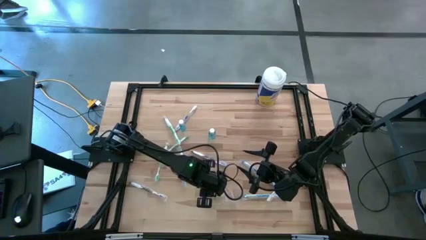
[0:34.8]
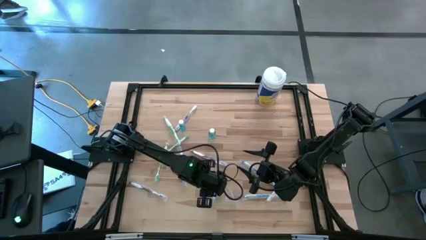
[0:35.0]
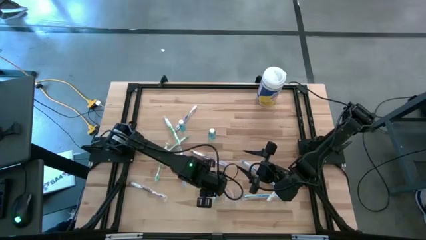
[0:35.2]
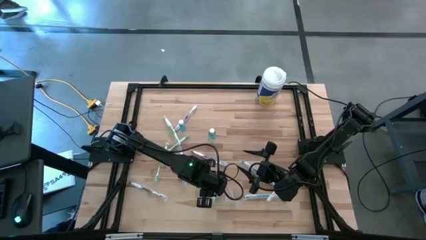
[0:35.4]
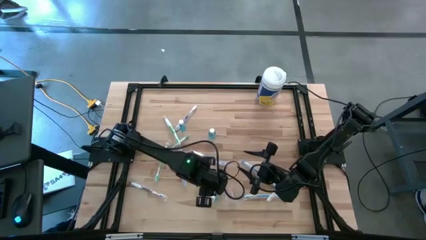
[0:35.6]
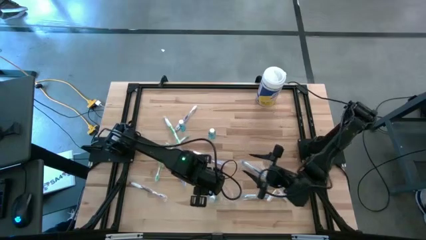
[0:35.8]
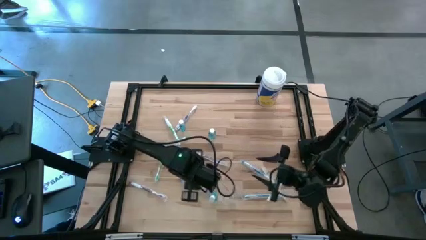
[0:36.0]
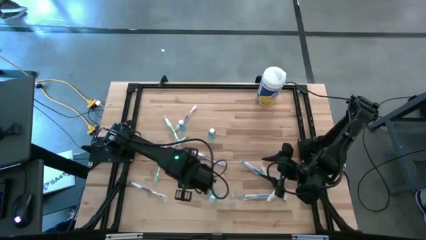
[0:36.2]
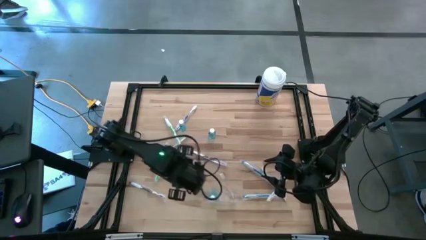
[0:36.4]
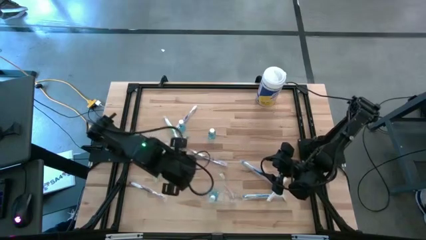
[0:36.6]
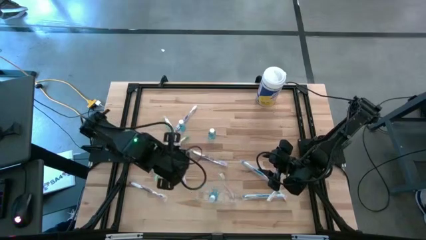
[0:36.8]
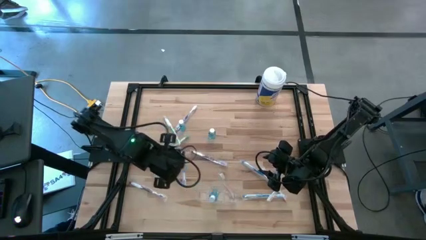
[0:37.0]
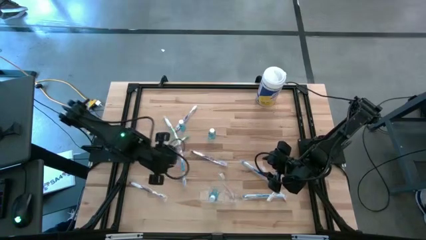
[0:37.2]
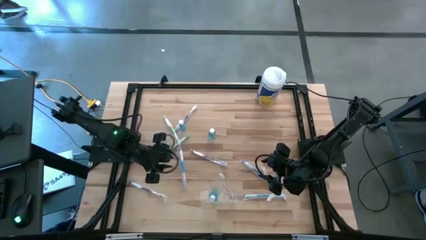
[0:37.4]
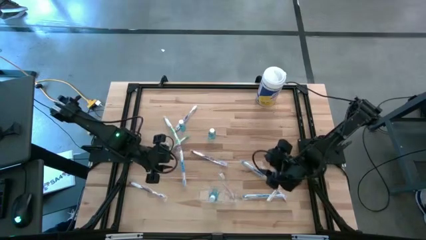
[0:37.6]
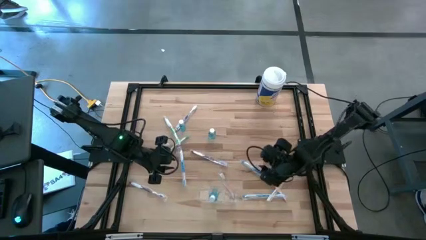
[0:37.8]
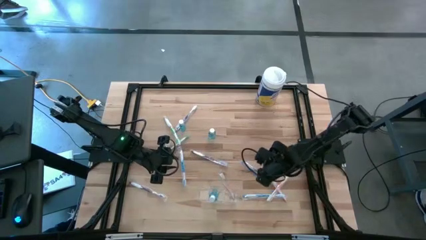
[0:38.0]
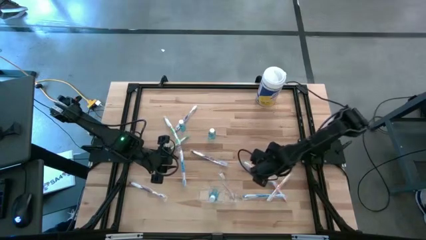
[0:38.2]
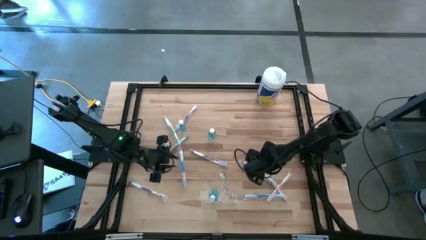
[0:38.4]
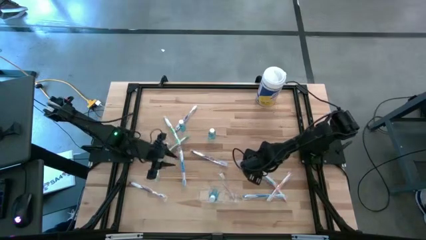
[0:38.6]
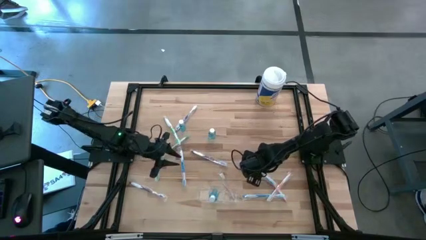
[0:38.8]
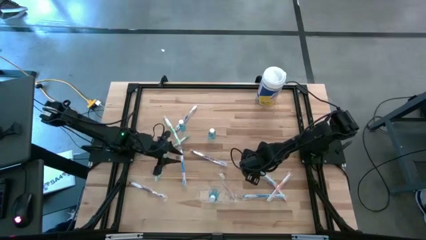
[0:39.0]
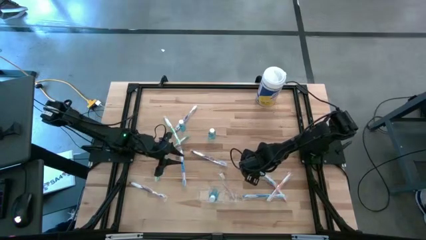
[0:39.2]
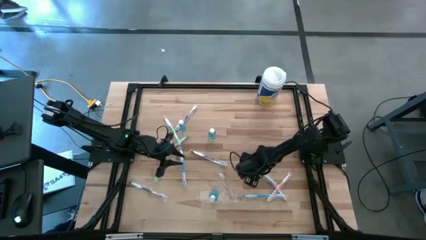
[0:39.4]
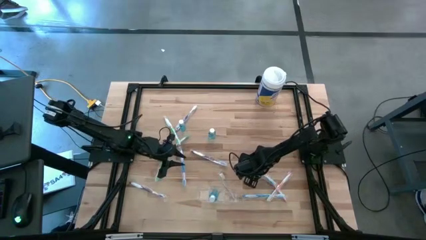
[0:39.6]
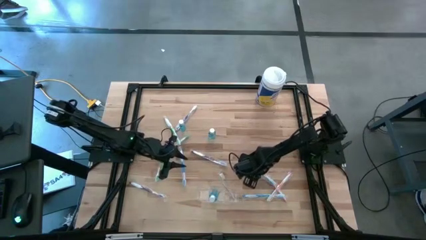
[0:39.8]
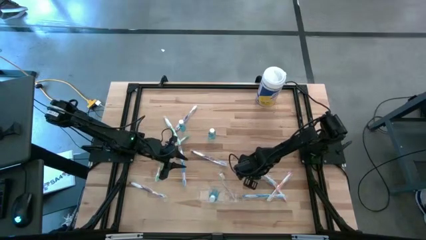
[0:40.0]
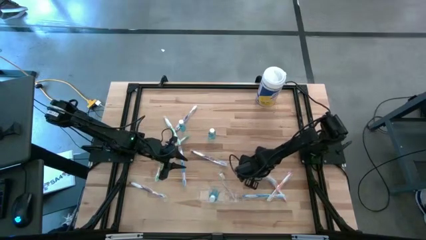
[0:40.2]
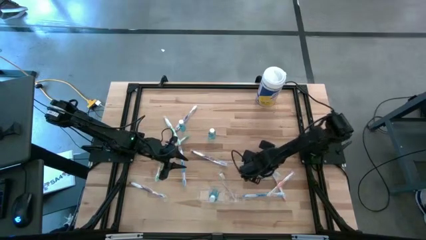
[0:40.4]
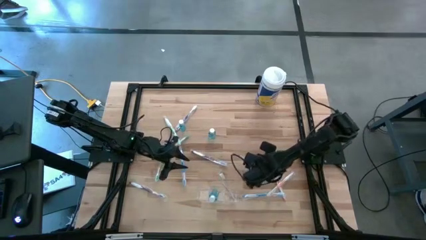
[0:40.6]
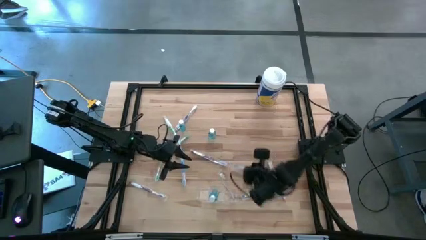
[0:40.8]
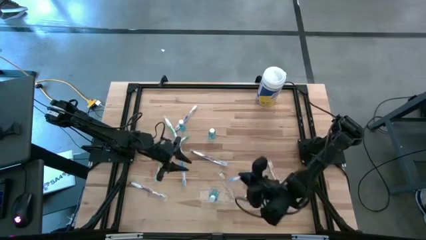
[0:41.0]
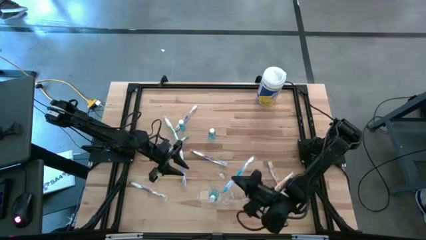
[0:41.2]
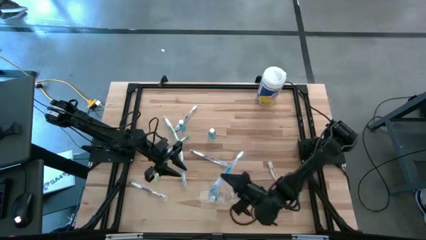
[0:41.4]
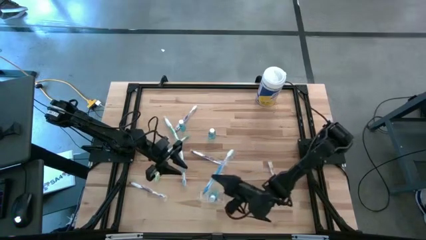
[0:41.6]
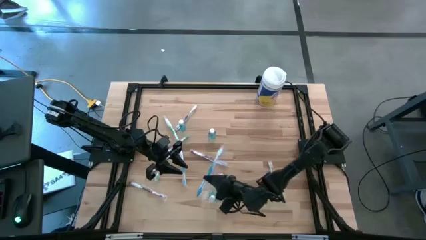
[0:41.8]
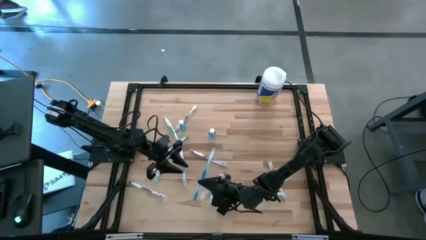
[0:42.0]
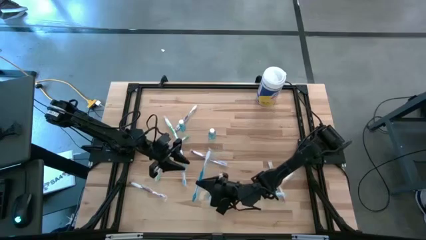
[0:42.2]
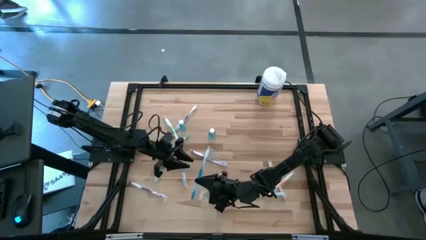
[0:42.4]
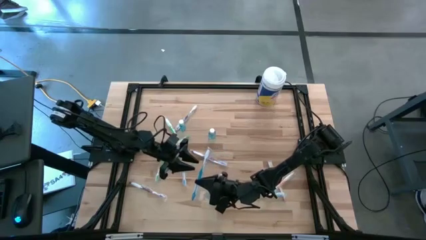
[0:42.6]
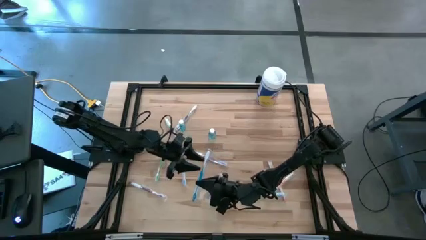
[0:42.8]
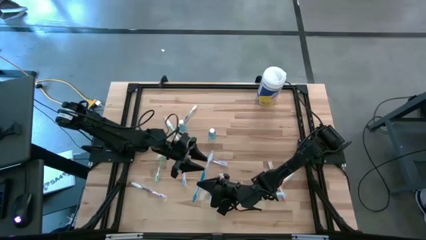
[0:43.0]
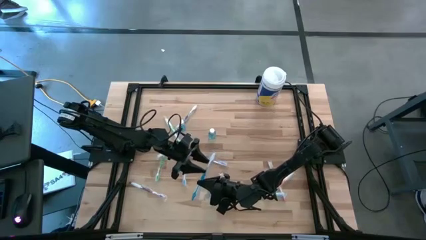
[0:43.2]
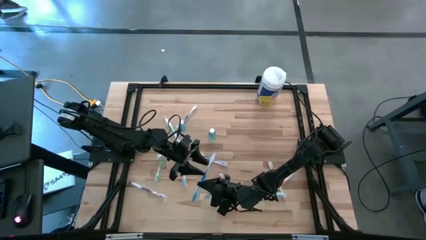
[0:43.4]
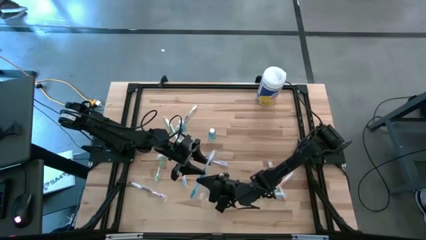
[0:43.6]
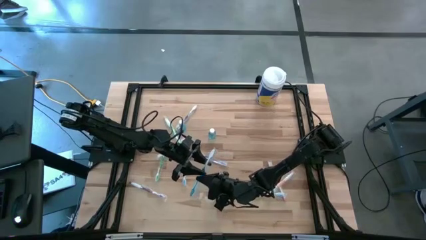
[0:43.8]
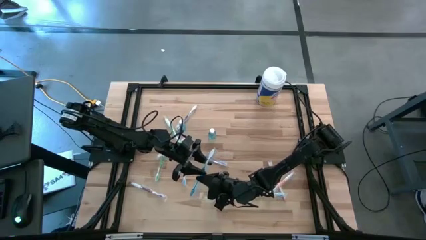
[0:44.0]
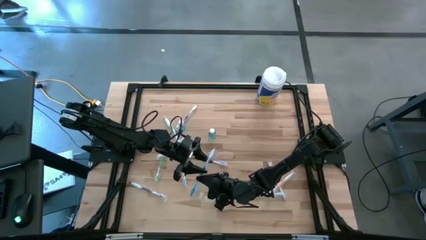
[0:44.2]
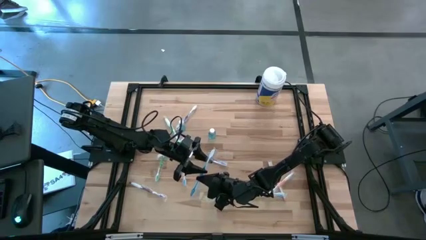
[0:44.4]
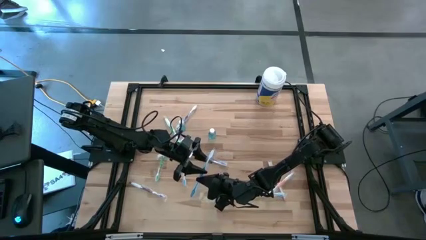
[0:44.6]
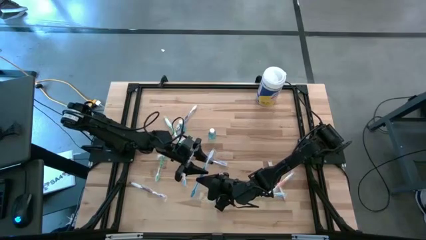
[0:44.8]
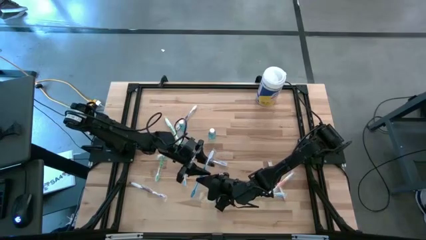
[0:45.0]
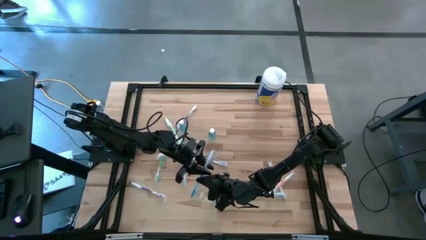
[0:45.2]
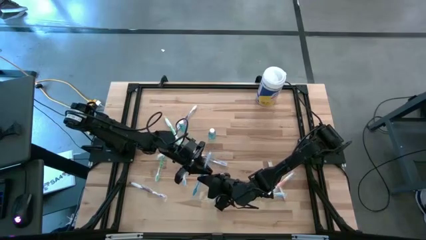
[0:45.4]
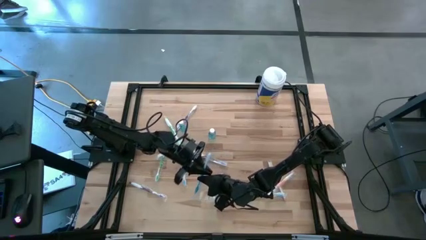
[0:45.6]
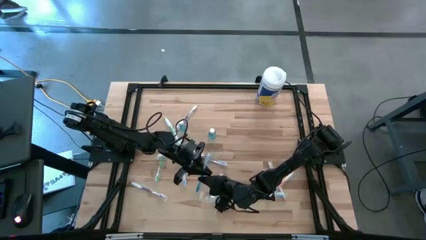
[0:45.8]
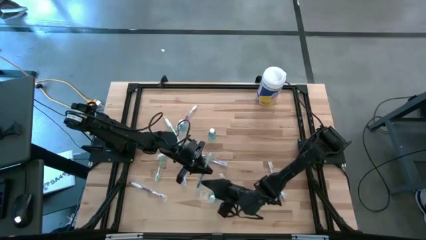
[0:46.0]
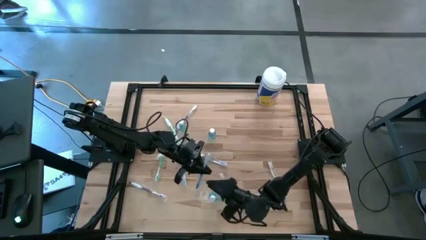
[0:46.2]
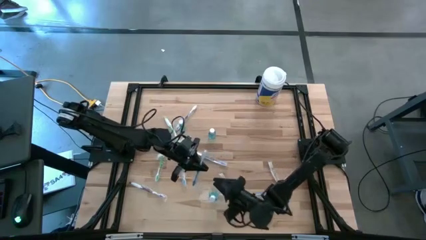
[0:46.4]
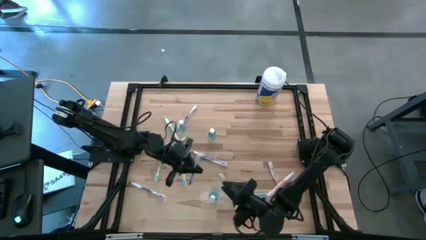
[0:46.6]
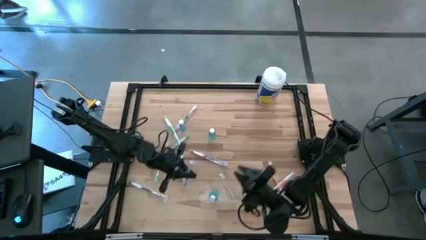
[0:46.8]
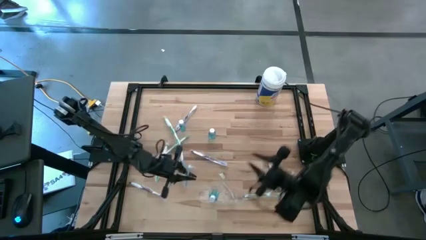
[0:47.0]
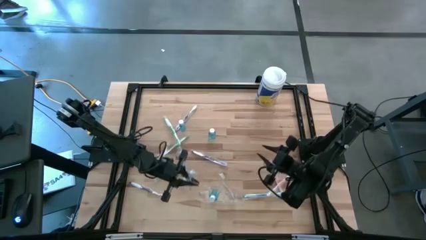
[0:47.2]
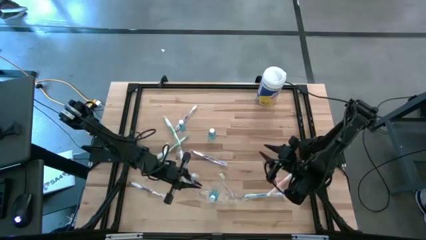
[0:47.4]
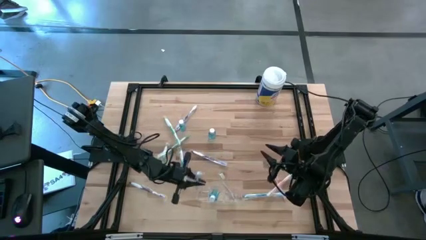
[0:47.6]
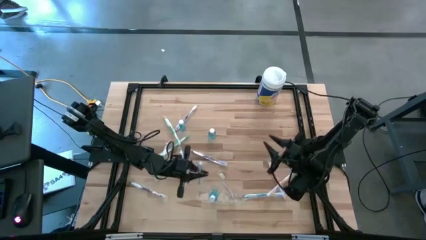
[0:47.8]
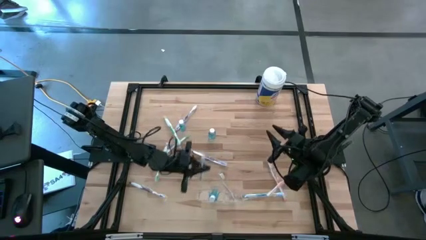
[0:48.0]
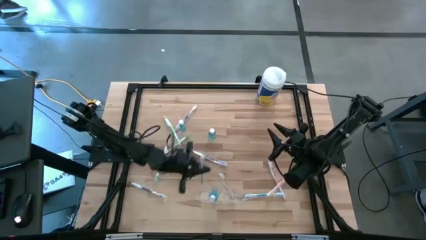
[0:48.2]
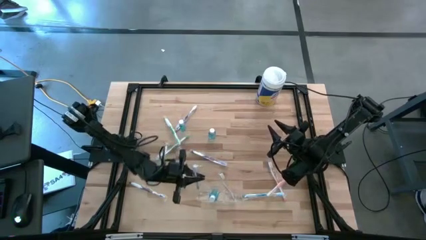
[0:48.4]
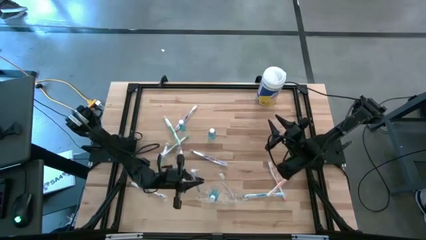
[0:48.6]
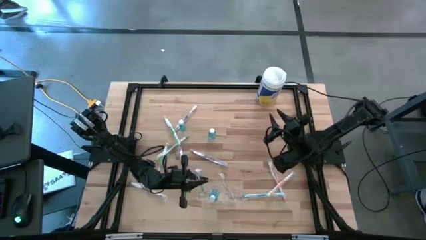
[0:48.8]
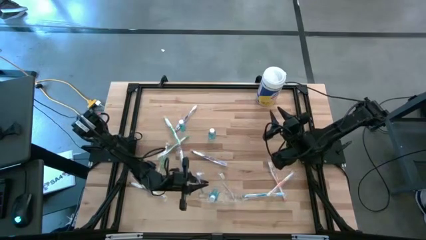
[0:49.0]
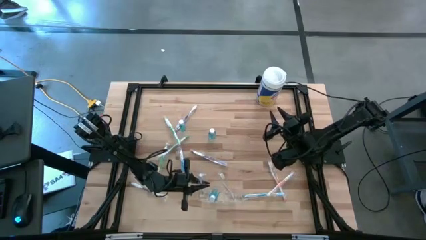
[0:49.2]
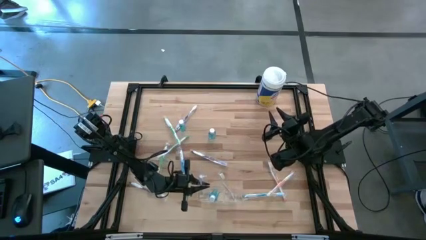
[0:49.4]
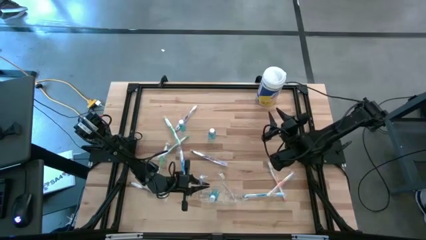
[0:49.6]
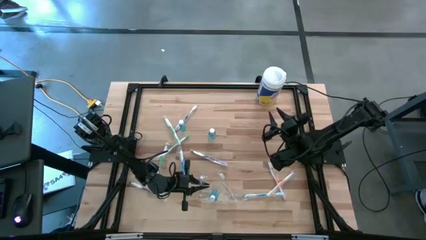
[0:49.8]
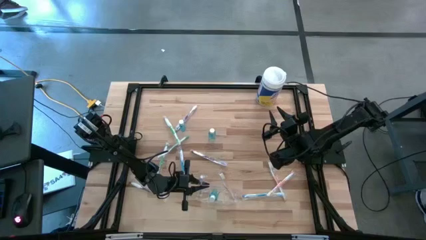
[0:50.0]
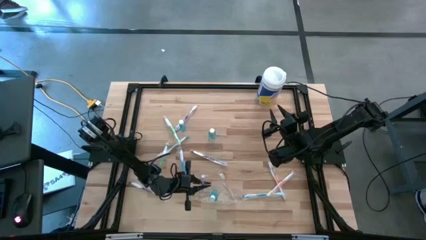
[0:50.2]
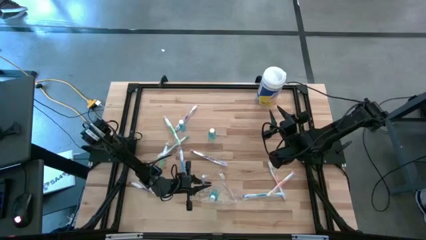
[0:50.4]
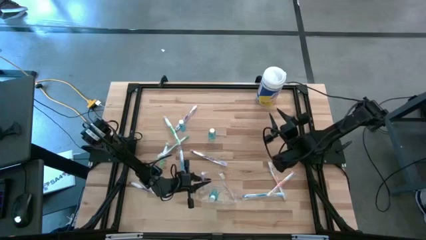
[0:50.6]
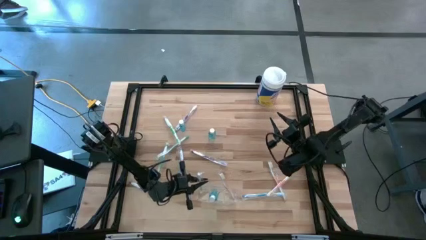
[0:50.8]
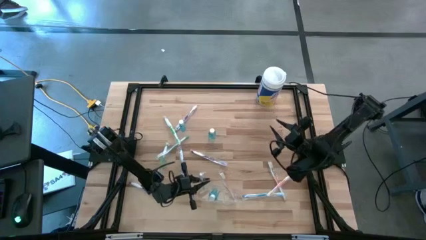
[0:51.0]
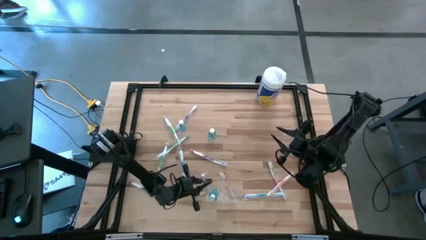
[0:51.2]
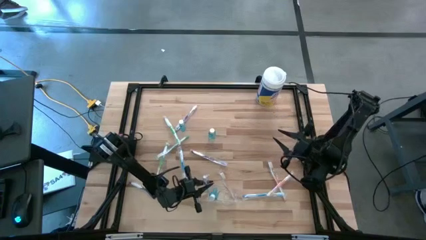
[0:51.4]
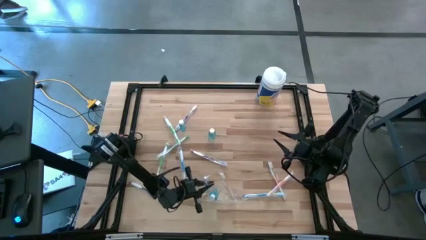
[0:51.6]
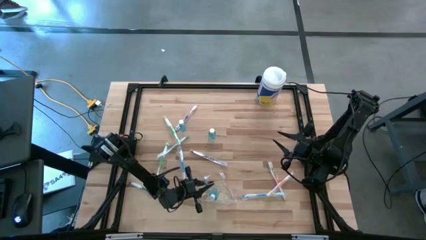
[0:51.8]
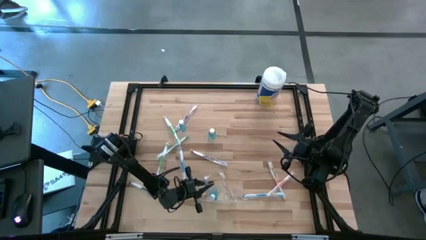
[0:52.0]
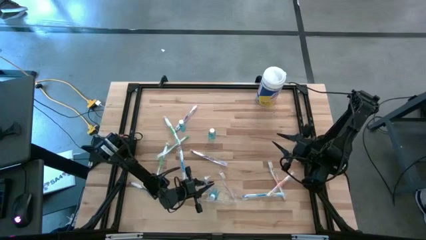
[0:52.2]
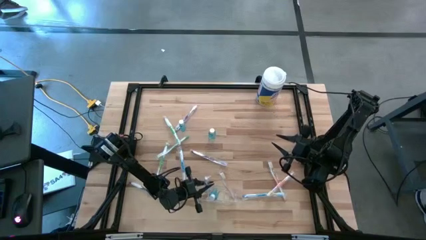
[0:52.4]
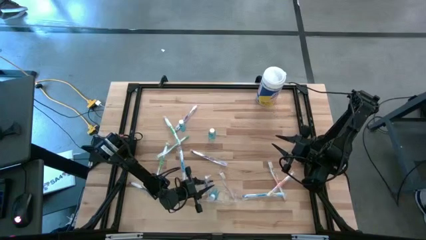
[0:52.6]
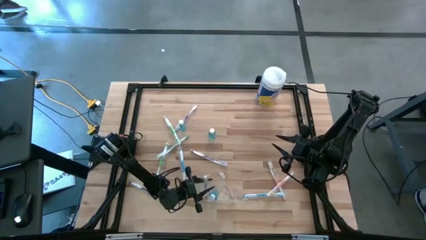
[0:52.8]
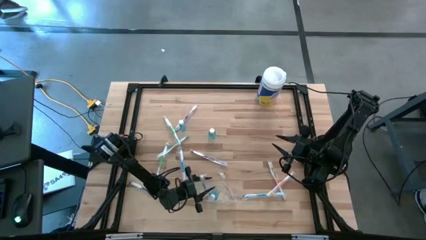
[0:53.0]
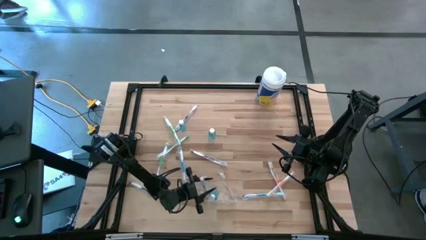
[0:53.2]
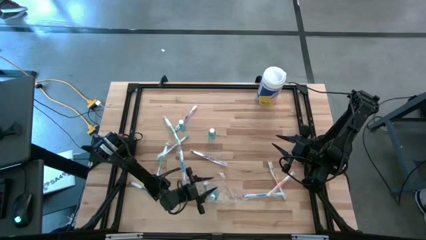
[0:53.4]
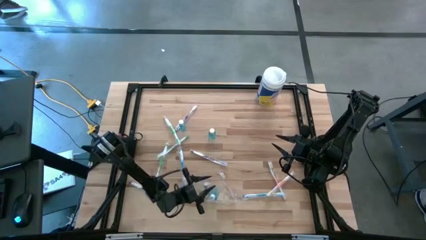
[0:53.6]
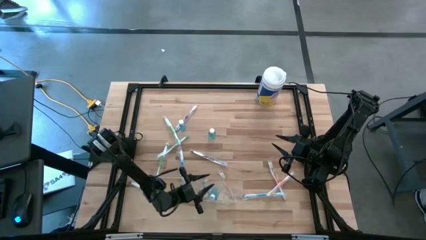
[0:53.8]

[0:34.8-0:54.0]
Task: Pick & Place toothbrushing station
Put the blue toothbrush into the transparent organizer
